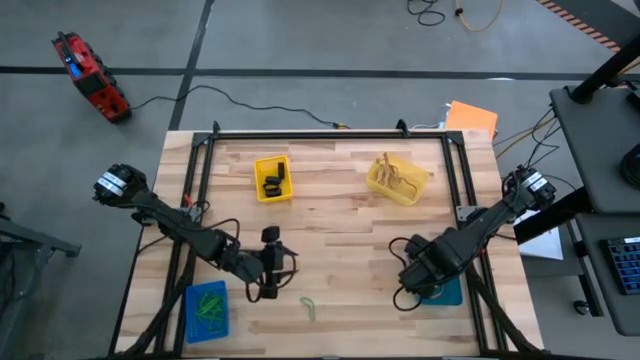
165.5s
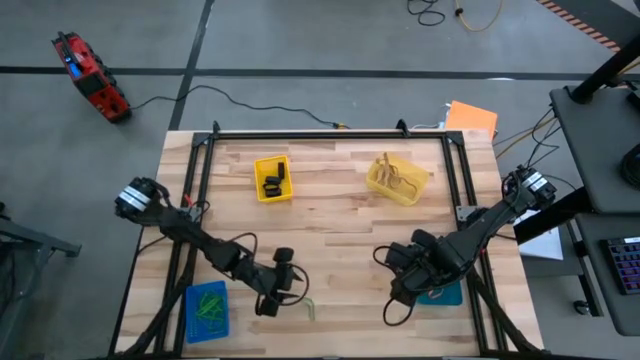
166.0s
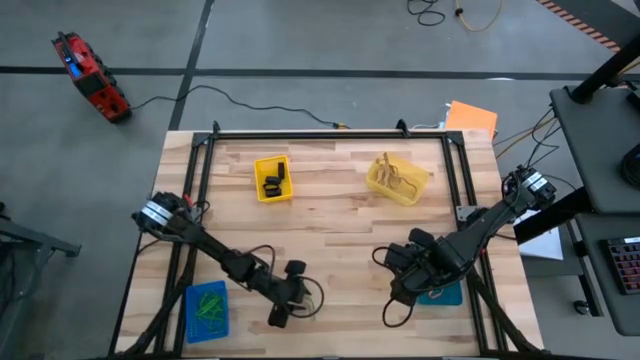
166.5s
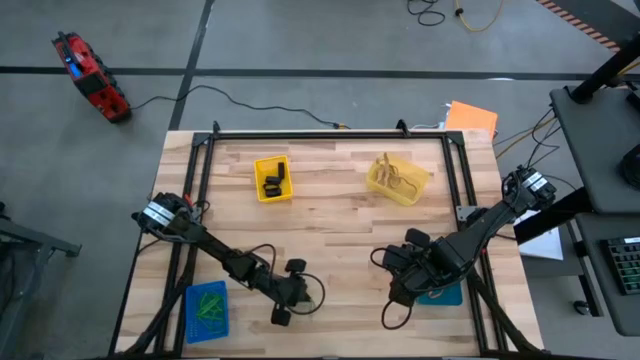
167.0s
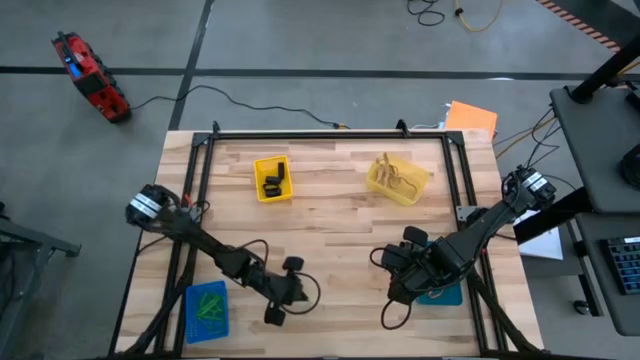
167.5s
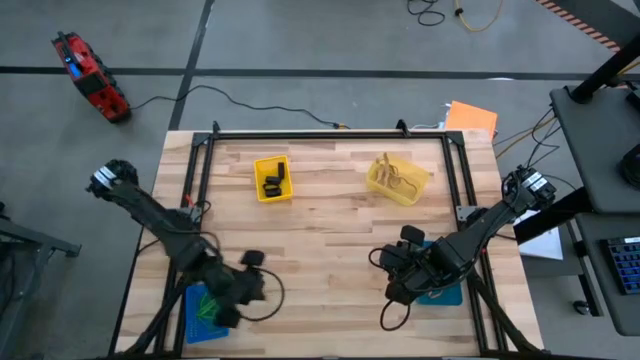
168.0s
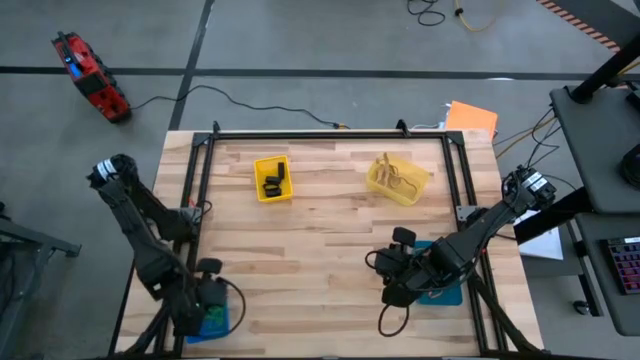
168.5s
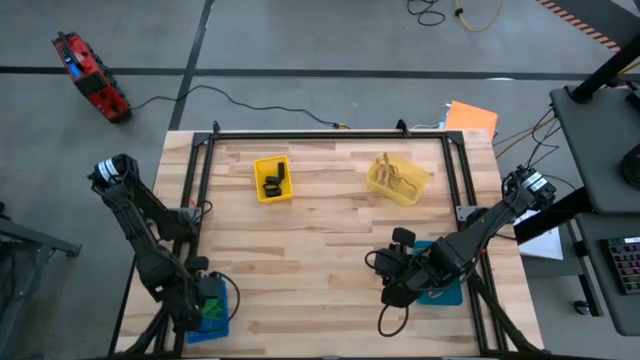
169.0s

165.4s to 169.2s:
Task: Sort rubber bands into baskets
Put the green rubber band into the left blue bin

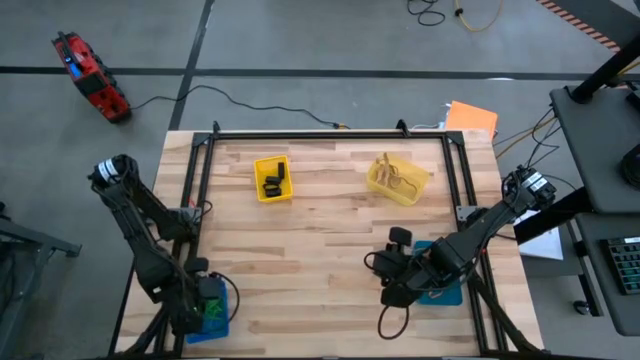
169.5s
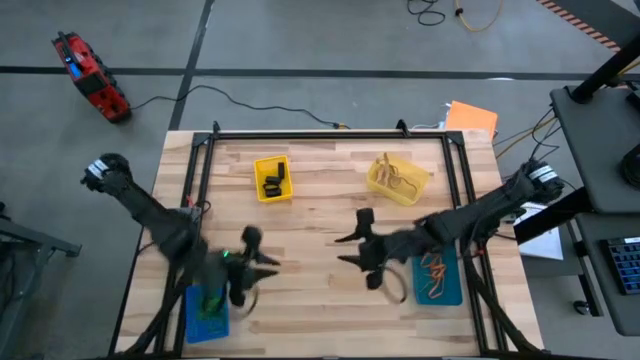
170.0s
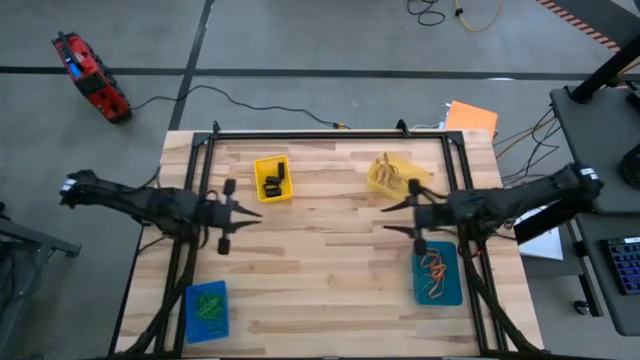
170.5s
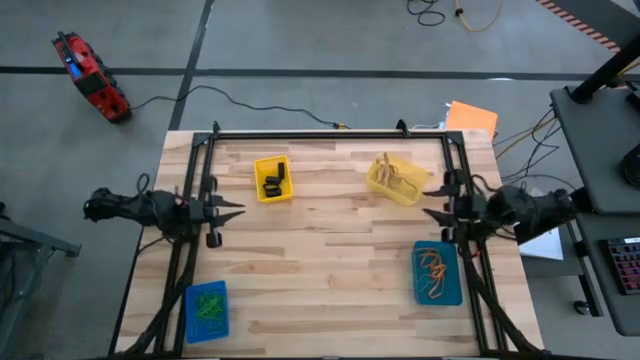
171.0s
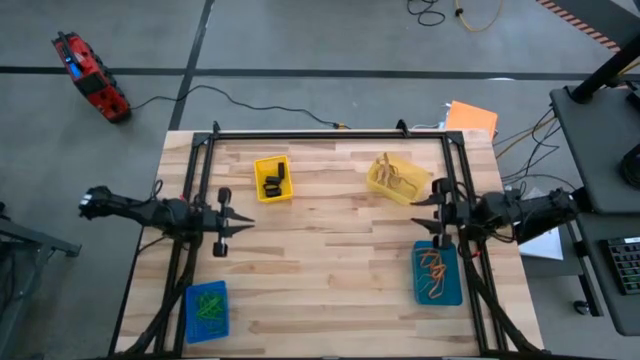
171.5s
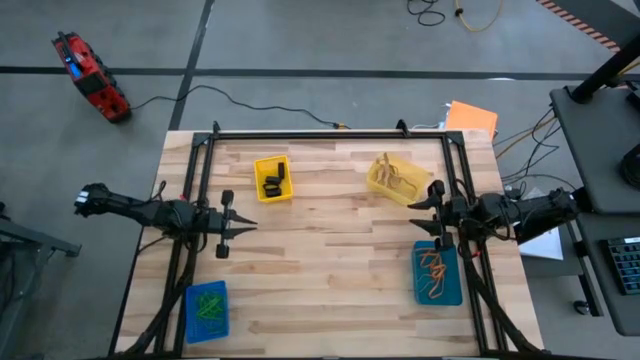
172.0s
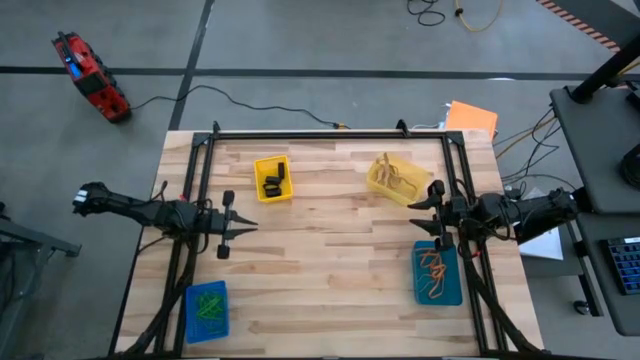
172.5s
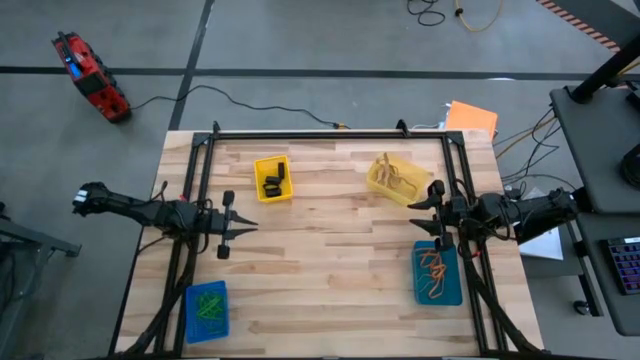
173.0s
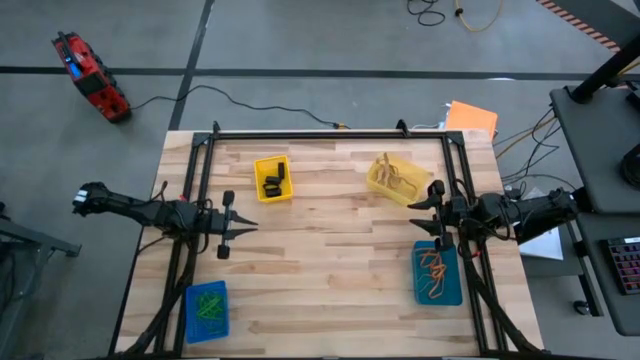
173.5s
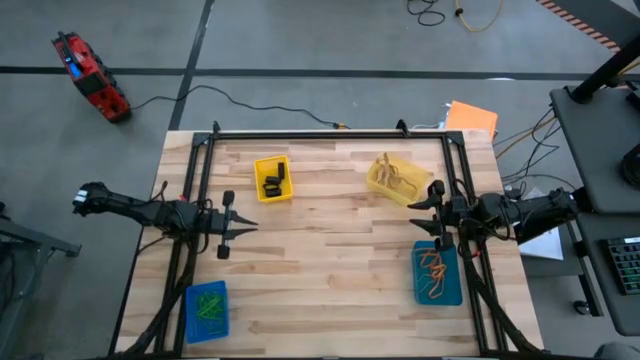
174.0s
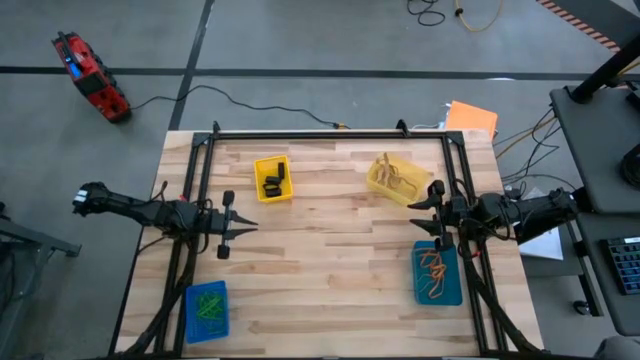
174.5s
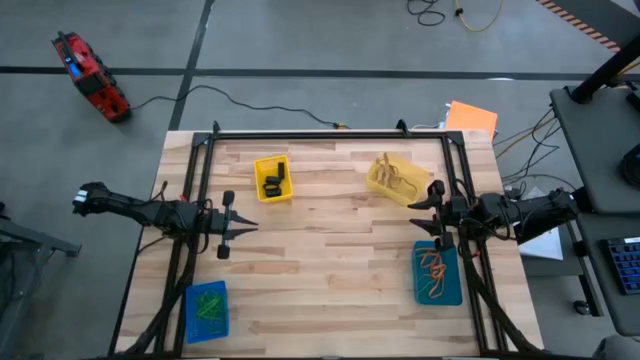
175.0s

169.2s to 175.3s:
Return to Home Position

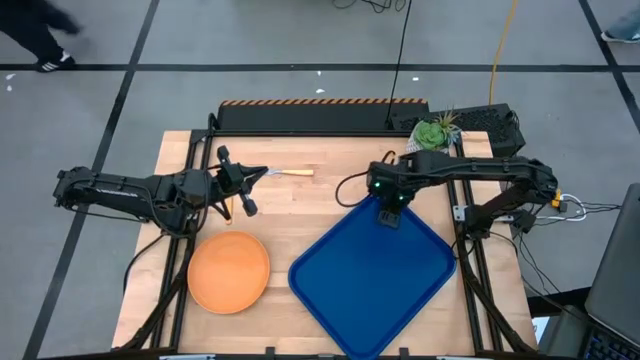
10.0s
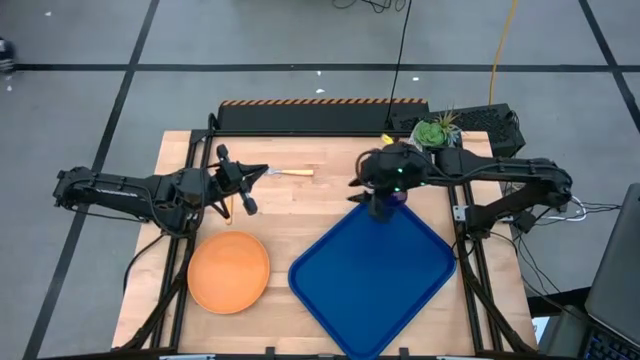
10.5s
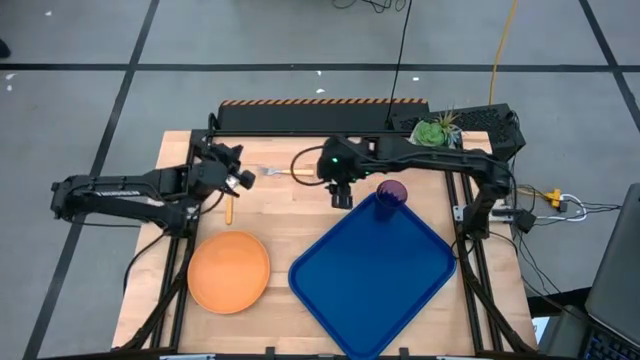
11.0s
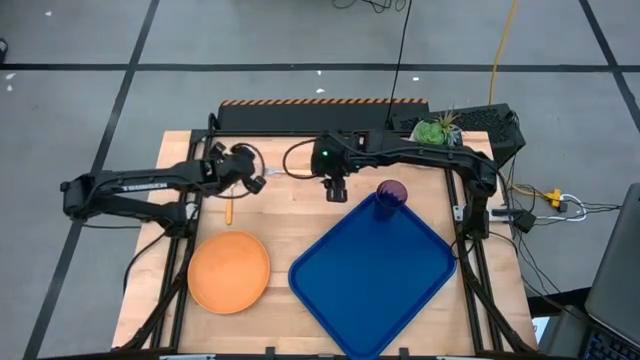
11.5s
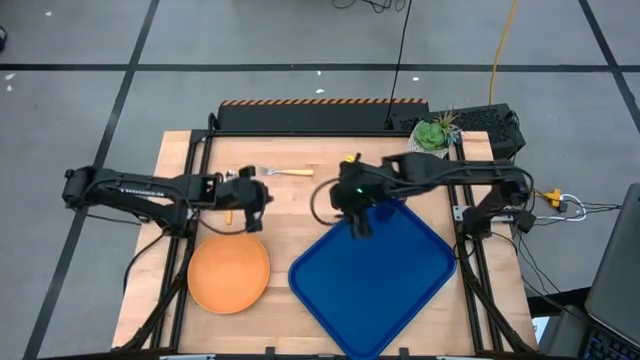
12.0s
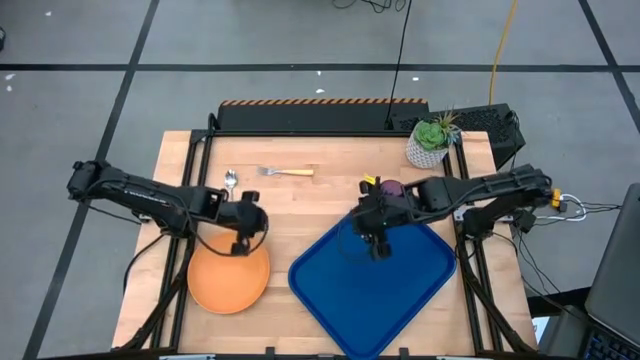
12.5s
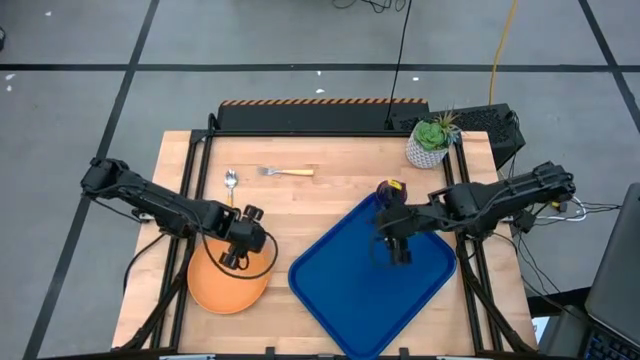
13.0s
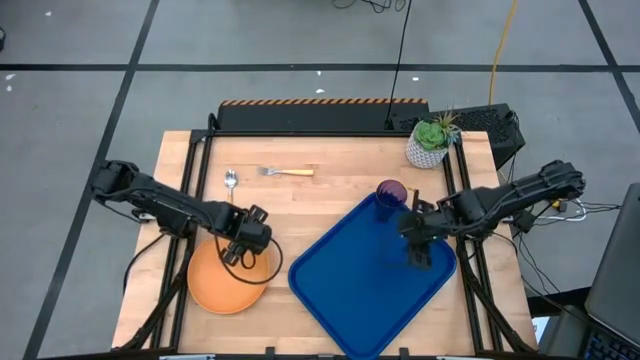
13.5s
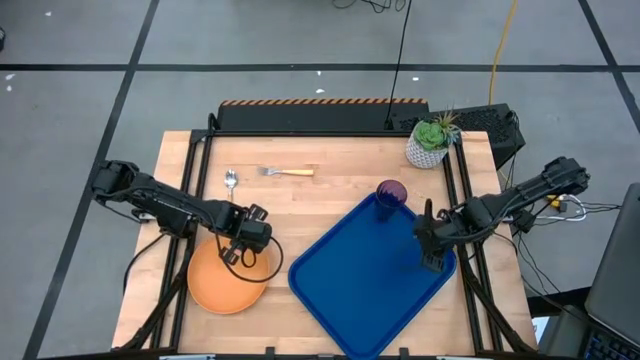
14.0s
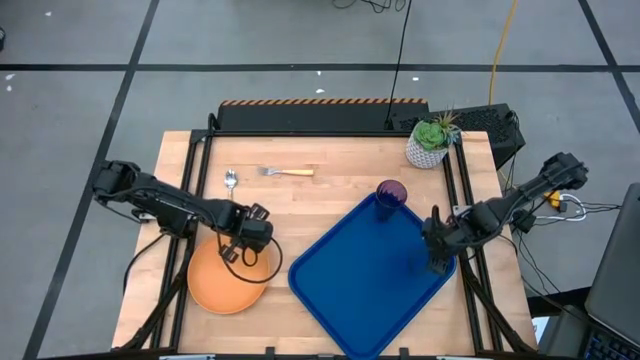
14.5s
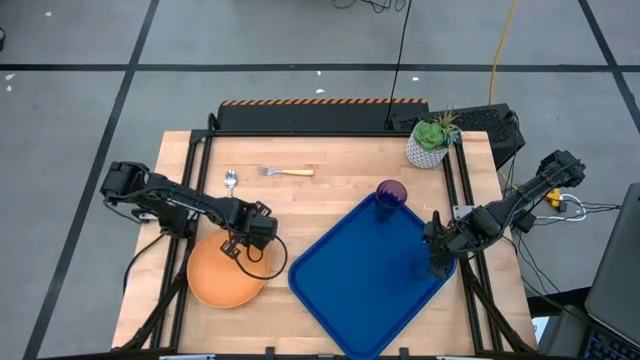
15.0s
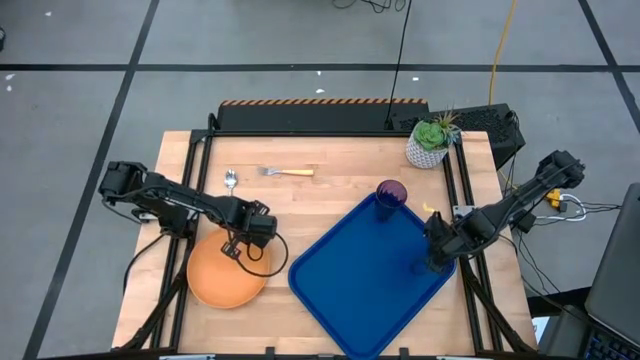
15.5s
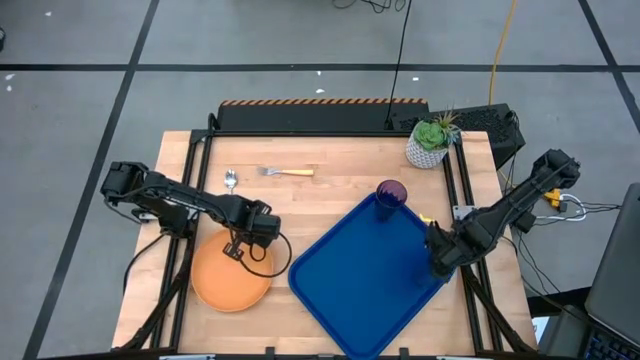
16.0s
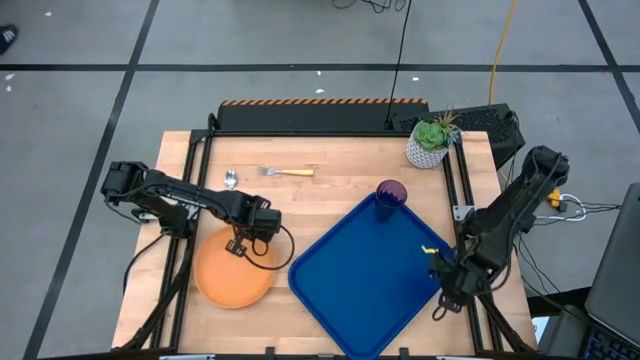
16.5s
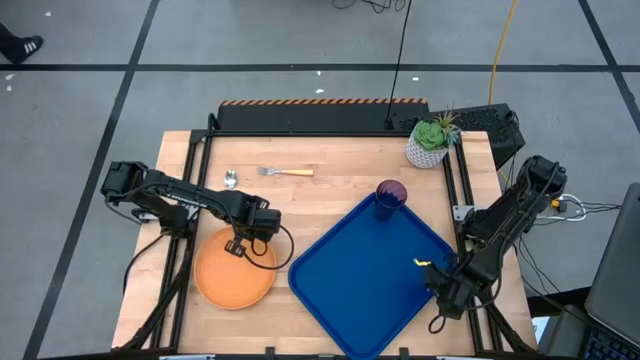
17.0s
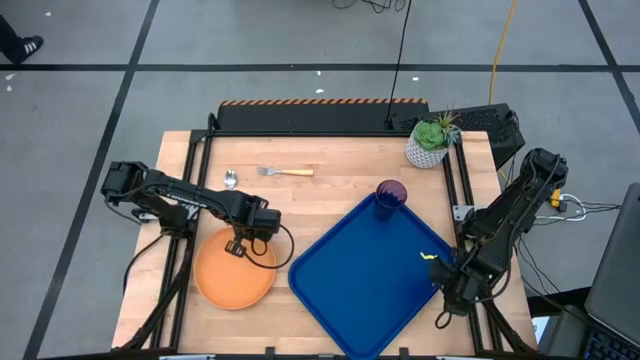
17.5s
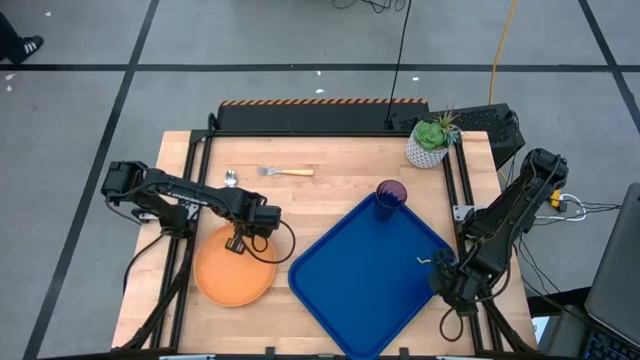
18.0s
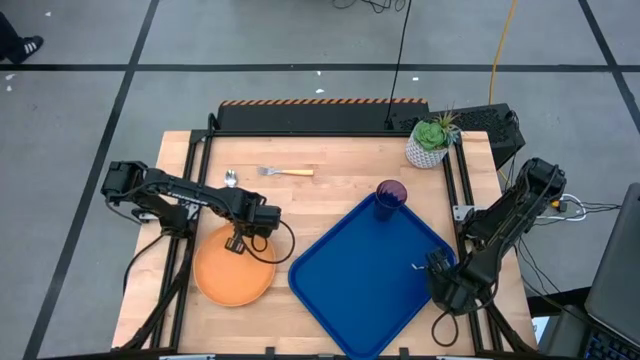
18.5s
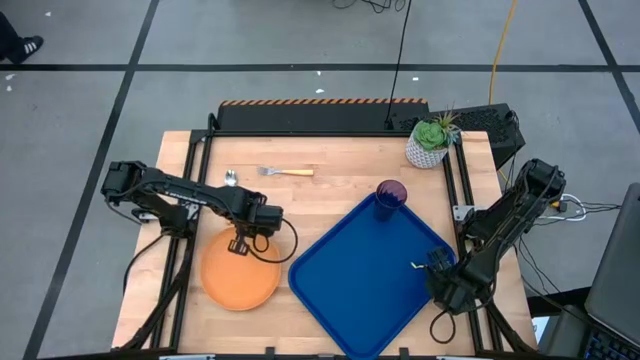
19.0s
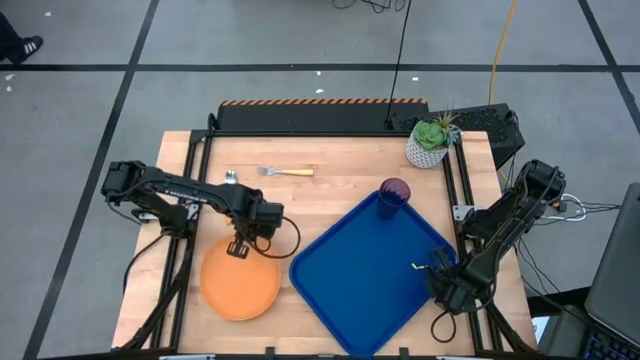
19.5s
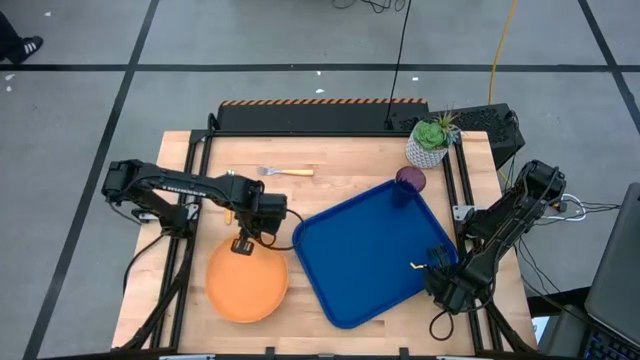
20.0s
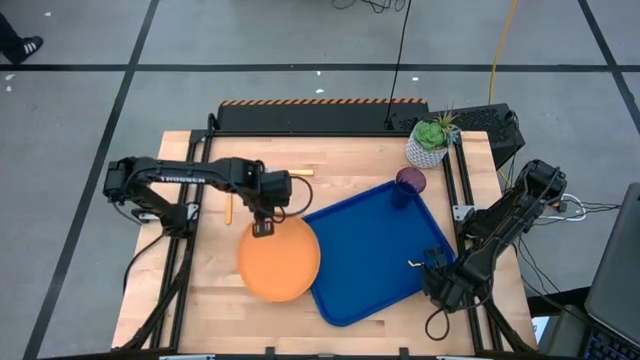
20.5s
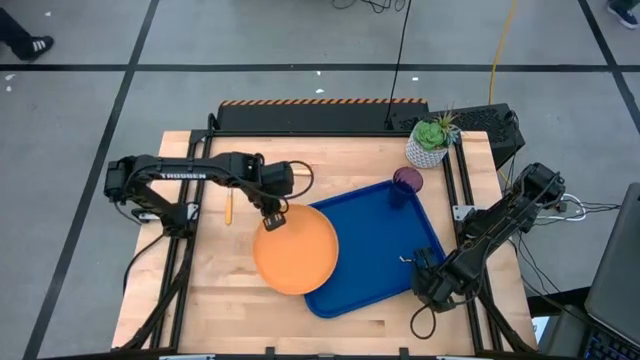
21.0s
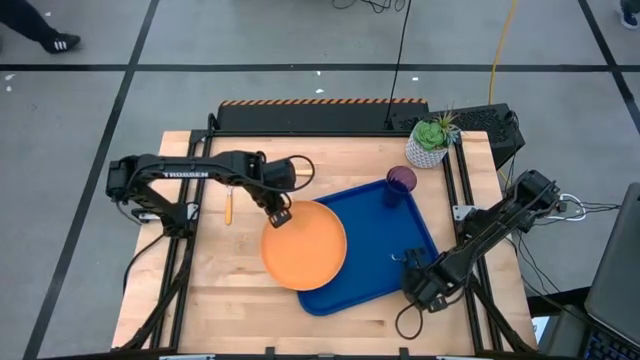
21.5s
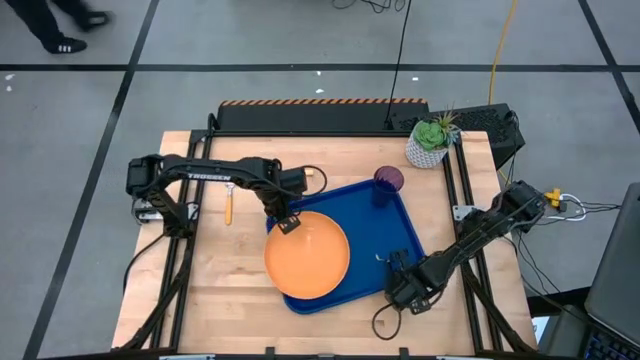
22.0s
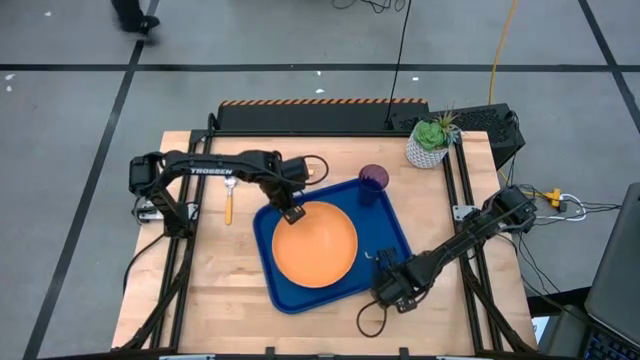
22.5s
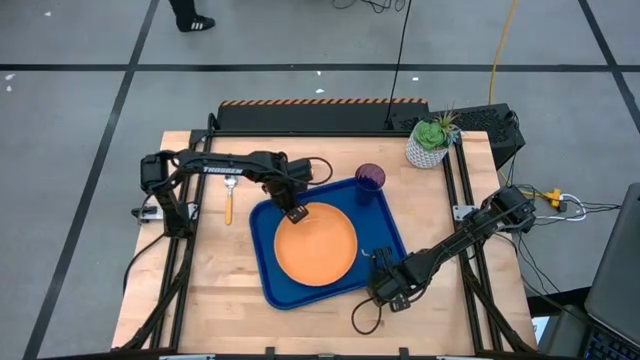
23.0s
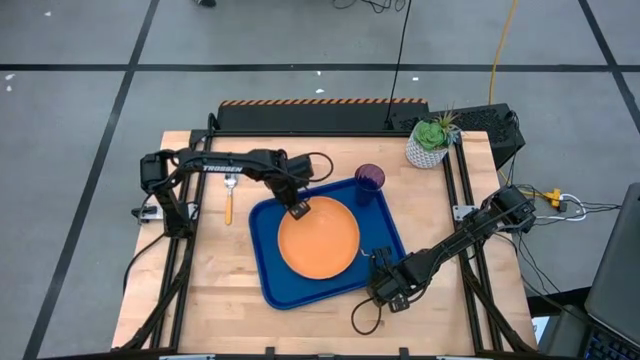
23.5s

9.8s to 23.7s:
Task: Pick and place plate/cup/fork/spoon on tray
Put the orange plate to the bottom left of the purple cup on the blue tray
